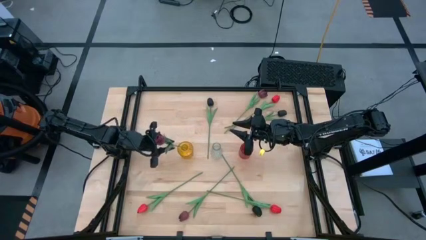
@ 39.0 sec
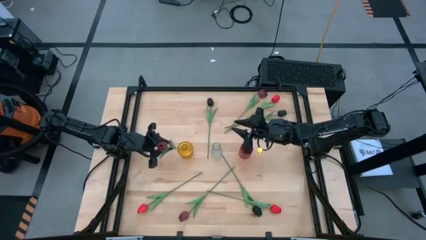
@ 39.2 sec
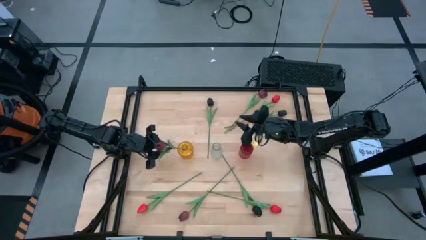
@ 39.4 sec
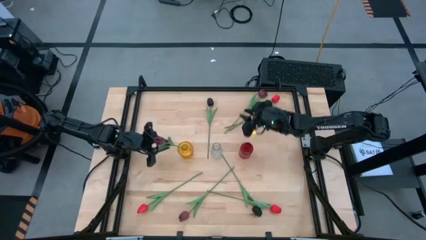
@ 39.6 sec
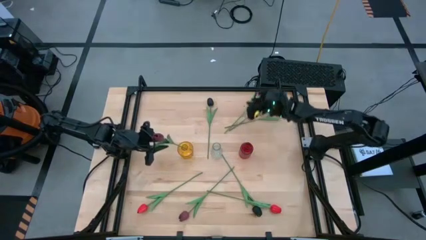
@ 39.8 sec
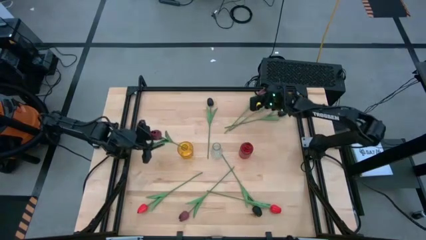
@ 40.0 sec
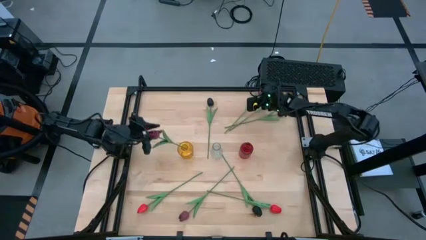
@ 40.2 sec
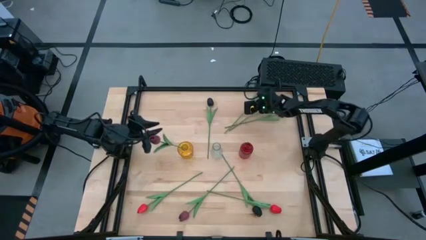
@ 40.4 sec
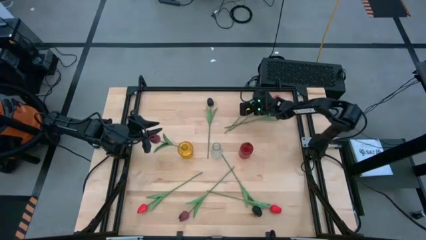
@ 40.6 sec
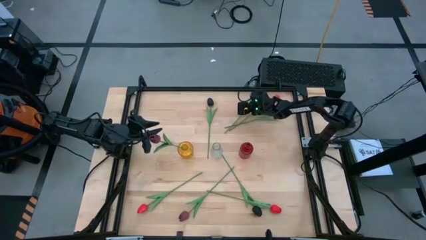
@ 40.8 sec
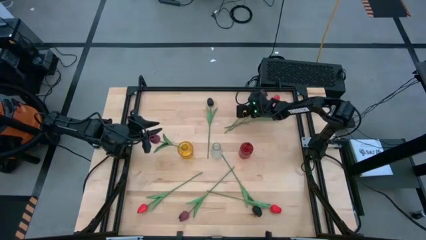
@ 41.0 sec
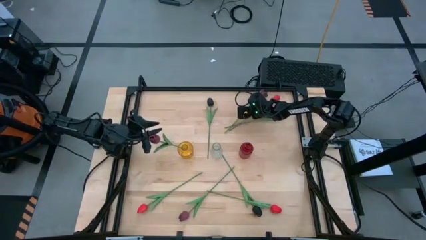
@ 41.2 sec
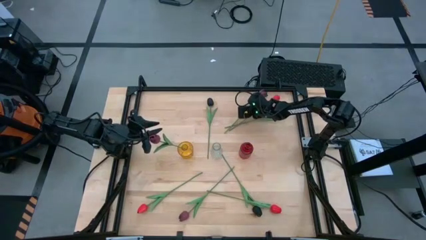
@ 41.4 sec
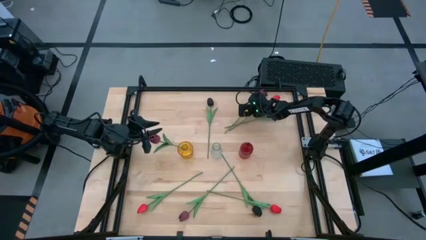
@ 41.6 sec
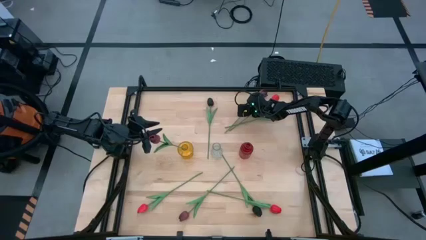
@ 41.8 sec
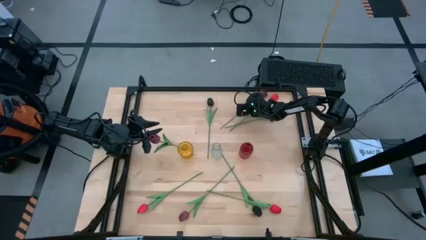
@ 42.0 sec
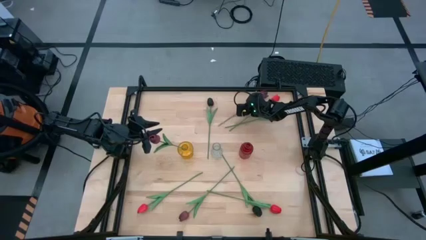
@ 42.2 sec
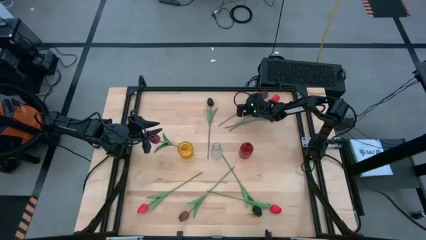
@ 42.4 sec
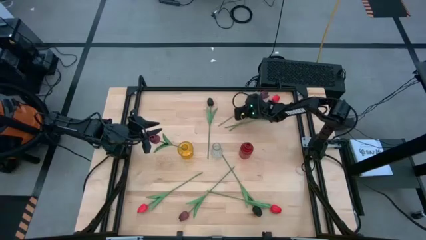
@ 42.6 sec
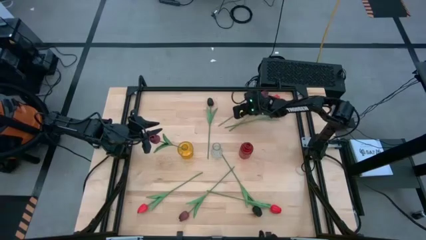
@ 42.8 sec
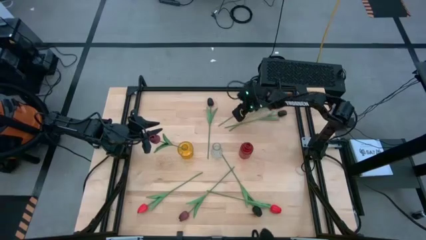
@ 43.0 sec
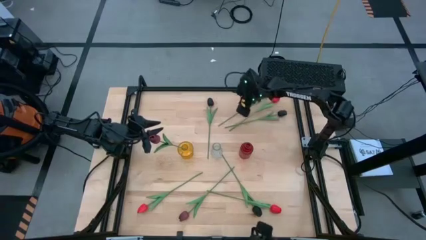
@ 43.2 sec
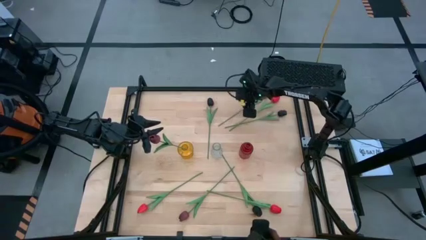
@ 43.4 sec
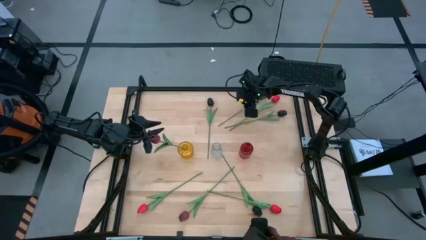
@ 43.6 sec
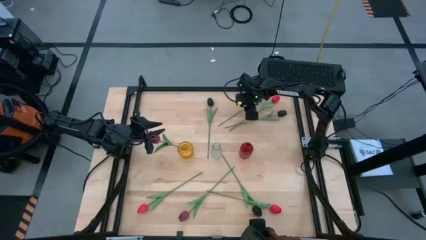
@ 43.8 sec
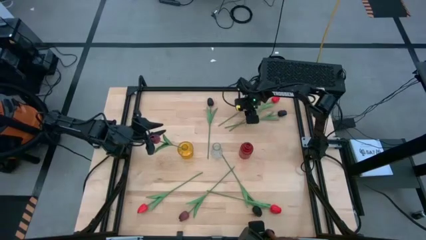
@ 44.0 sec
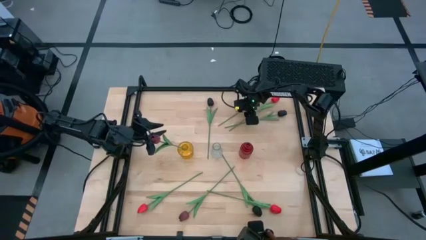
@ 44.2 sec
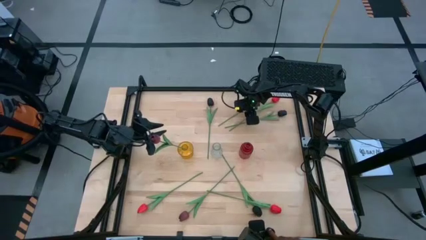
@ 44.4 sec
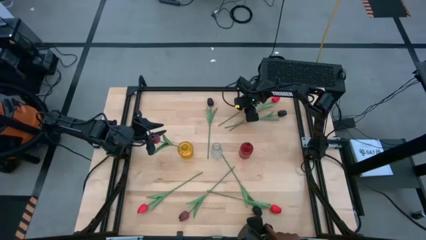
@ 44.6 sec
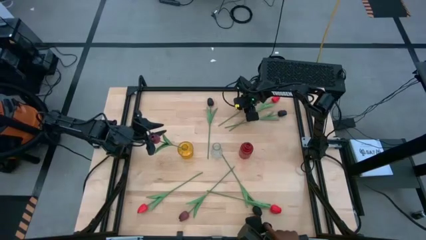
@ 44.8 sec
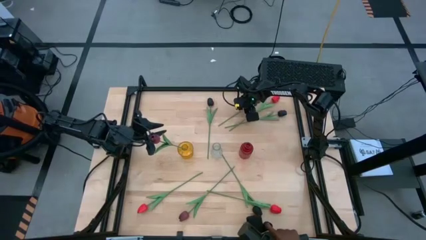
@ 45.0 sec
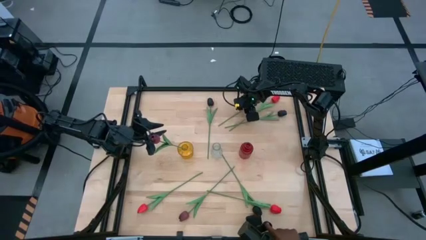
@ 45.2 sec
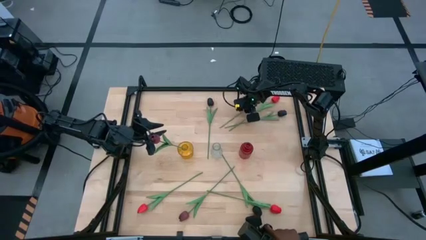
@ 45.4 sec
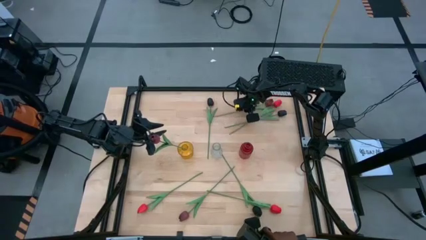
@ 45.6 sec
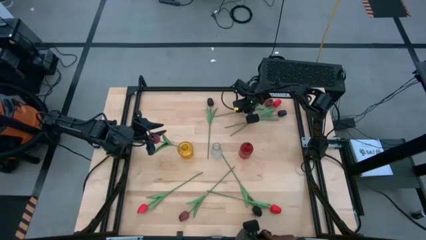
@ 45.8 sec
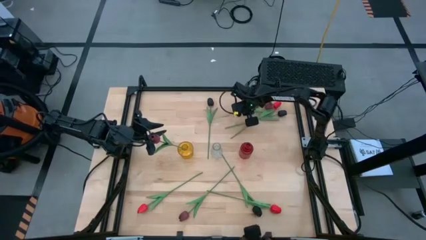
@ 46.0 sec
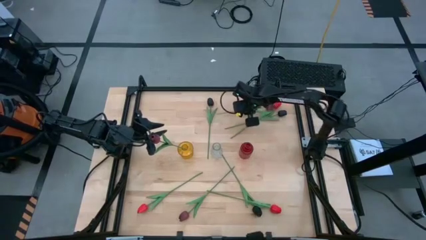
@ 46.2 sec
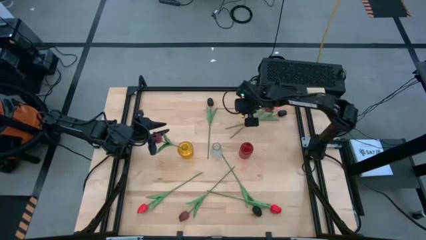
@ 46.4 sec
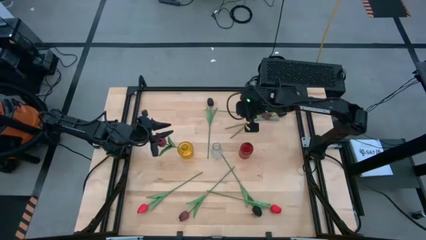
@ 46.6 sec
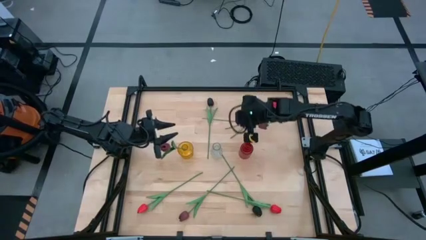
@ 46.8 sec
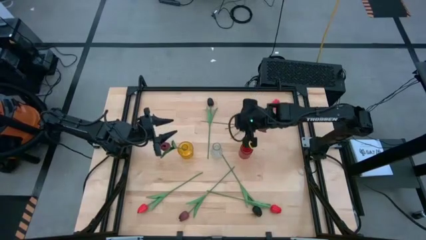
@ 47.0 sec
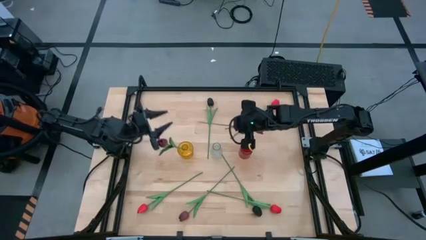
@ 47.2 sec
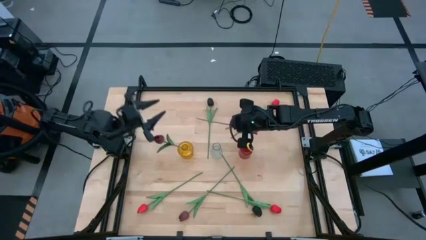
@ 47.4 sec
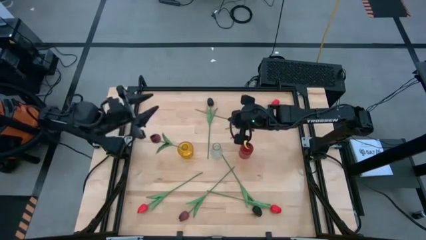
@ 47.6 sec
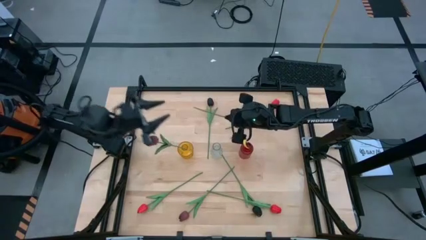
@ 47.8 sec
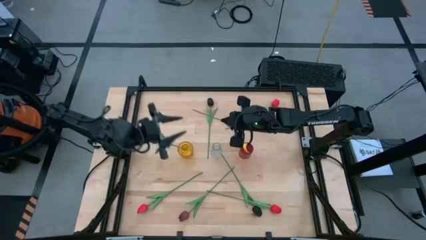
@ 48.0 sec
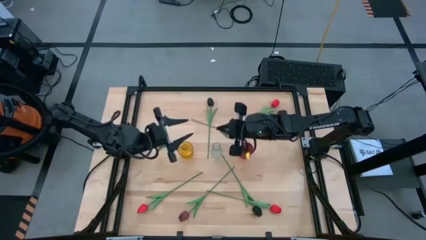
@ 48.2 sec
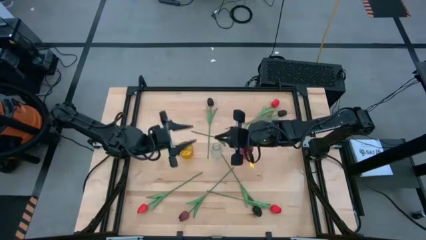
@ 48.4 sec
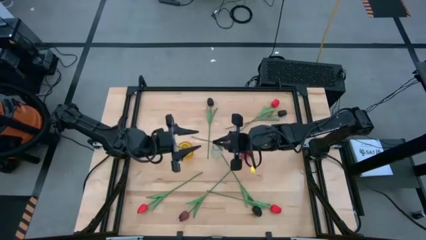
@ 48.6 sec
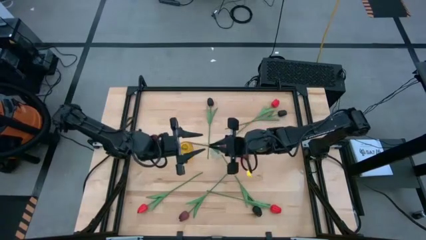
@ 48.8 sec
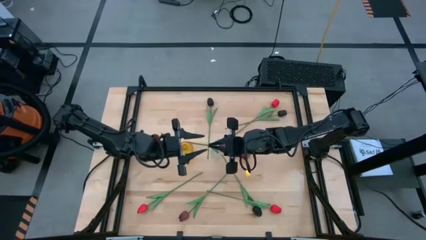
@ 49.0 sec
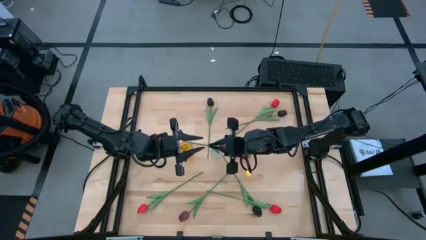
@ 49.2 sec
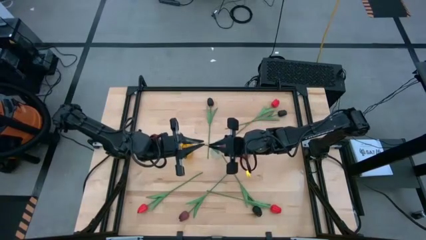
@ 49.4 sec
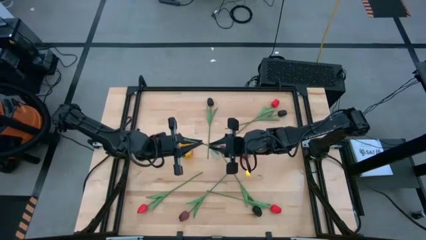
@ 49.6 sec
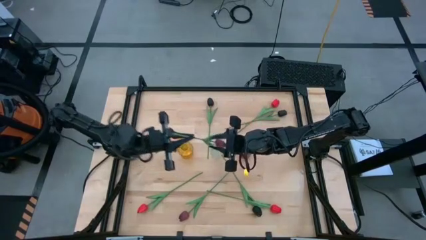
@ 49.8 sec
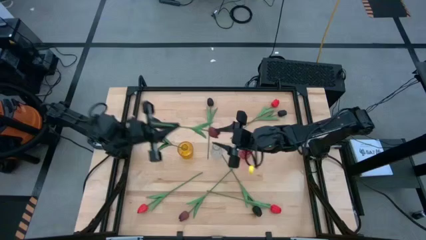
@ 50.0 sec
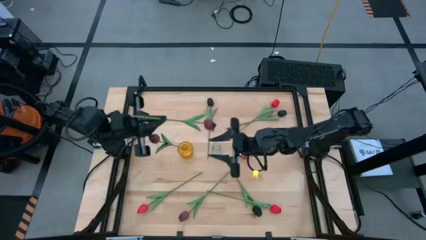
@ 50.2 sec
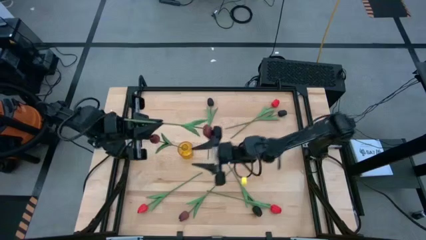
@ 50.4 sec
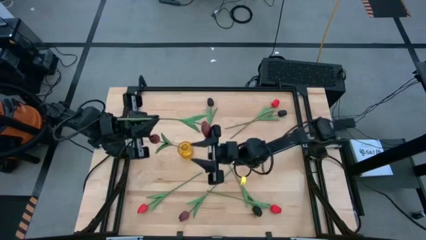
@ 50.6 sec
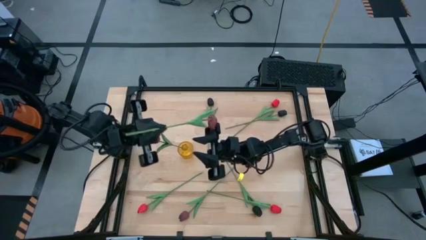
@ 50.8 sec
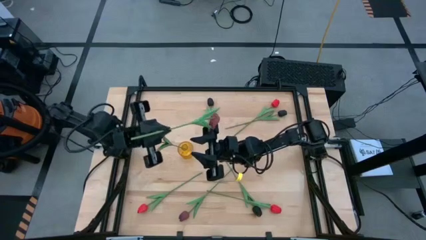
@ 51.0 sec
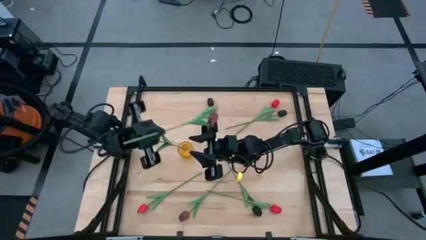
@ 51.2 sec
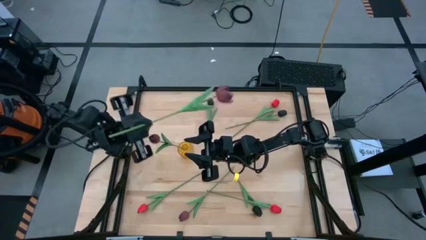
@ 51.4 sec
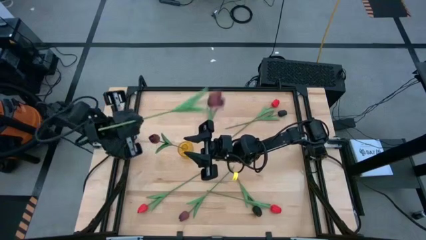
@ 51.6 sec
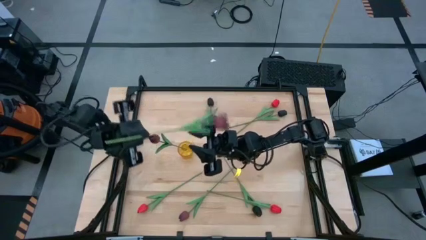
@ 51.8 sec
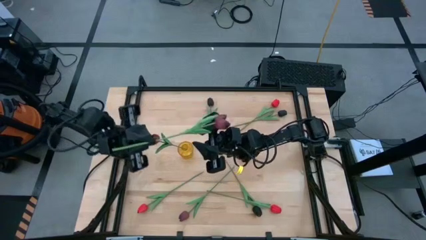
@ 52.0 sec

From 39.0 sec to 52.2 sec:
Task: Sort flowers into vase by color
Put the top red tulip into the yellow vase
